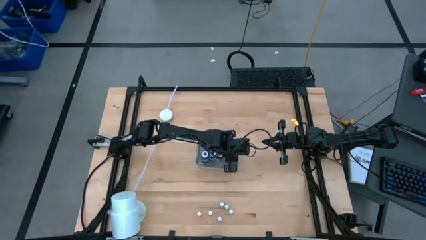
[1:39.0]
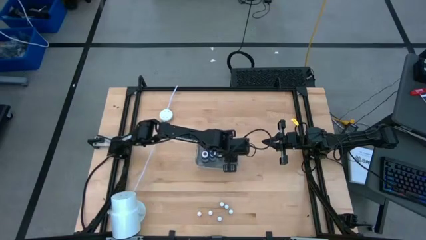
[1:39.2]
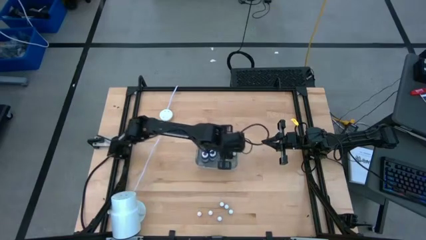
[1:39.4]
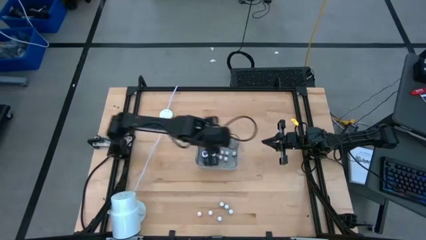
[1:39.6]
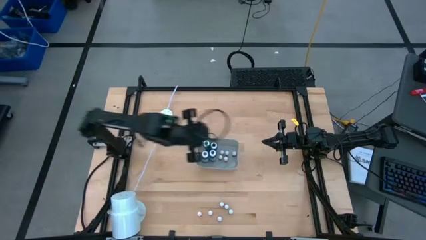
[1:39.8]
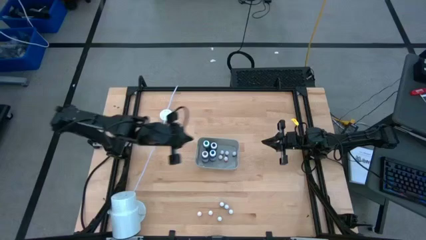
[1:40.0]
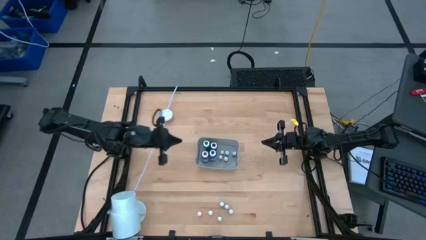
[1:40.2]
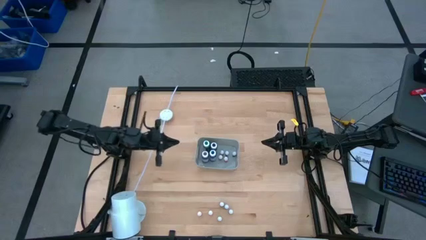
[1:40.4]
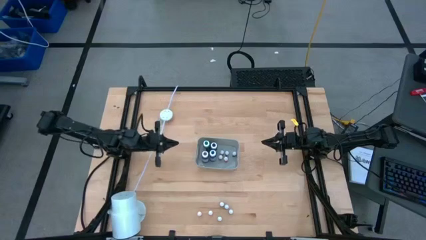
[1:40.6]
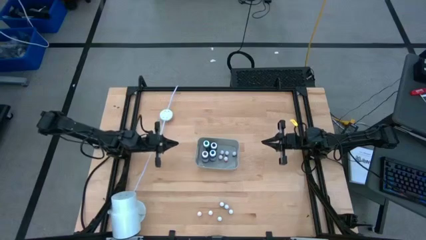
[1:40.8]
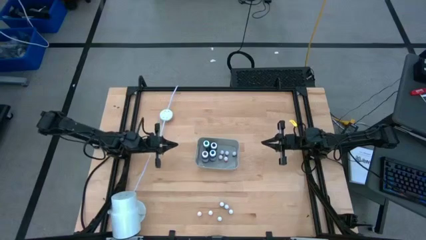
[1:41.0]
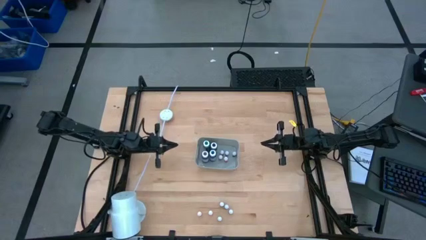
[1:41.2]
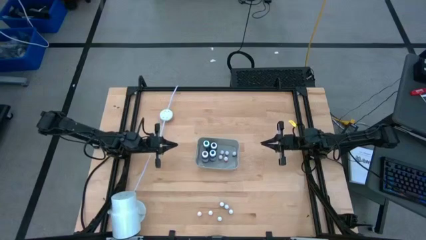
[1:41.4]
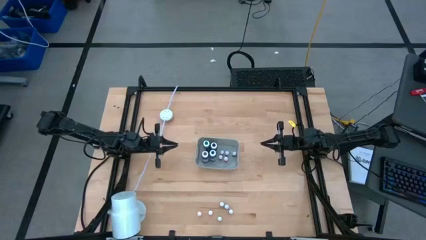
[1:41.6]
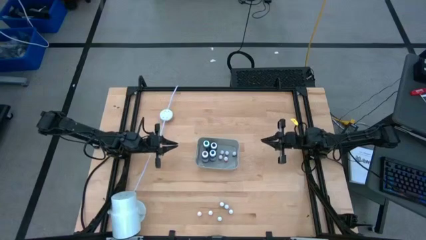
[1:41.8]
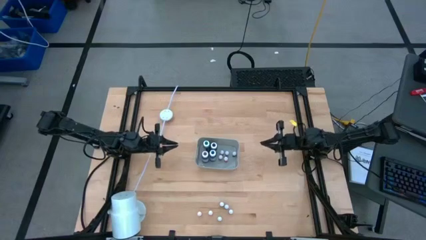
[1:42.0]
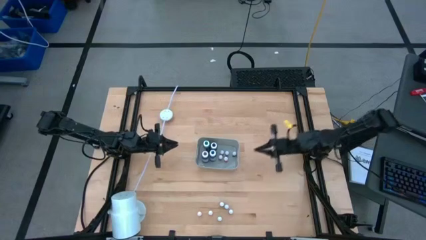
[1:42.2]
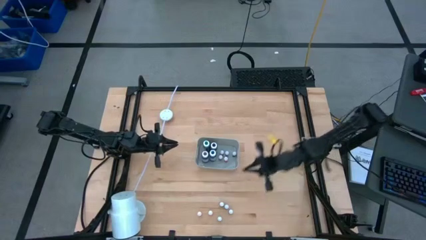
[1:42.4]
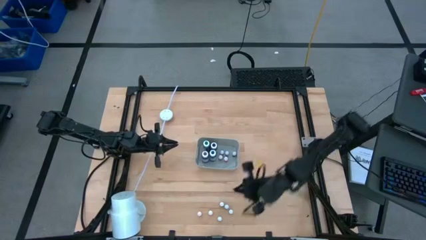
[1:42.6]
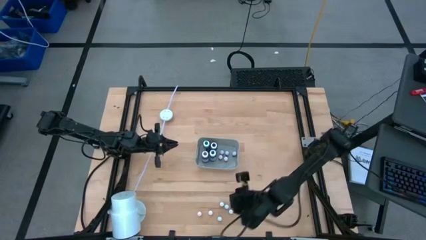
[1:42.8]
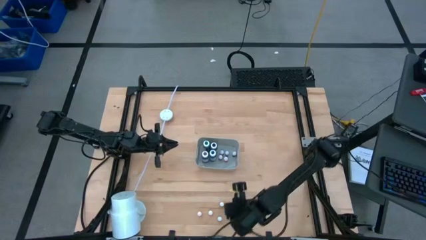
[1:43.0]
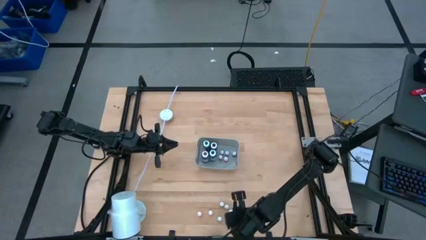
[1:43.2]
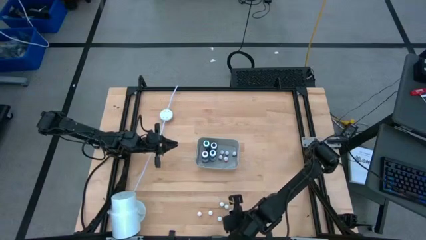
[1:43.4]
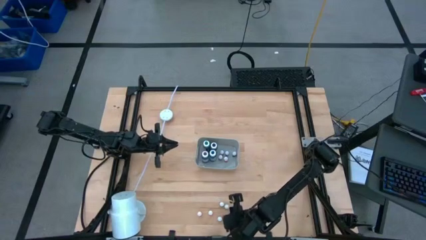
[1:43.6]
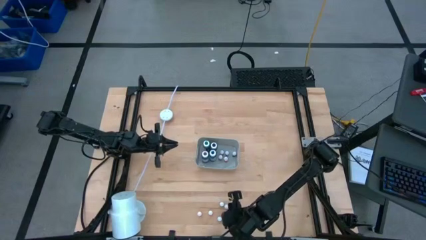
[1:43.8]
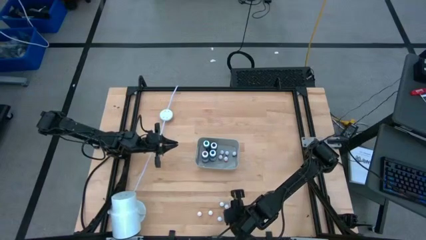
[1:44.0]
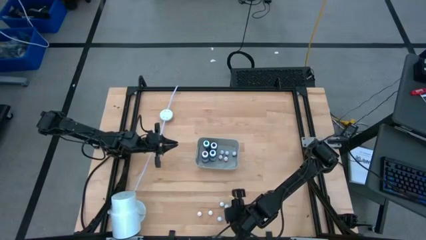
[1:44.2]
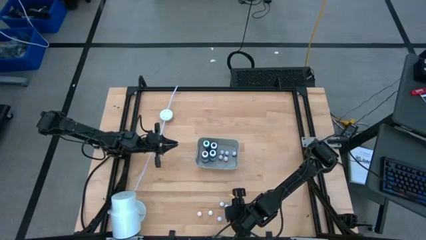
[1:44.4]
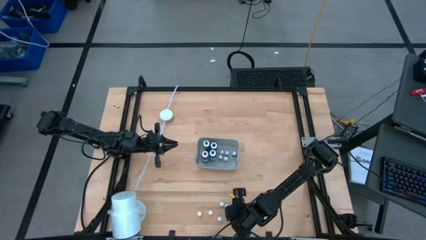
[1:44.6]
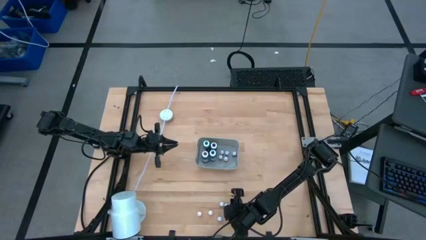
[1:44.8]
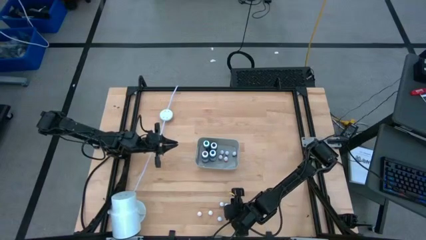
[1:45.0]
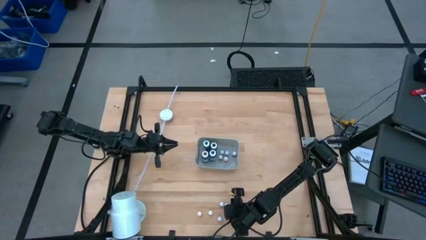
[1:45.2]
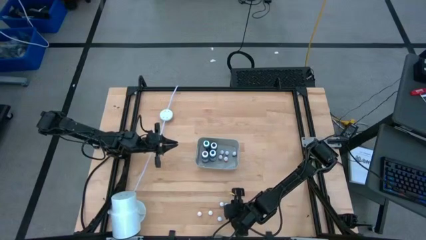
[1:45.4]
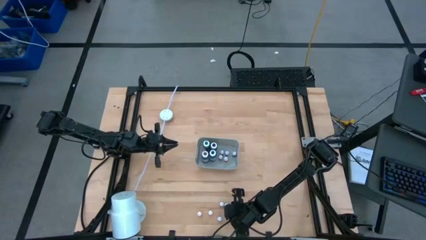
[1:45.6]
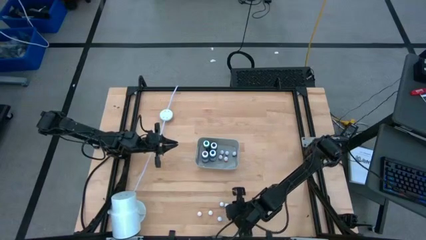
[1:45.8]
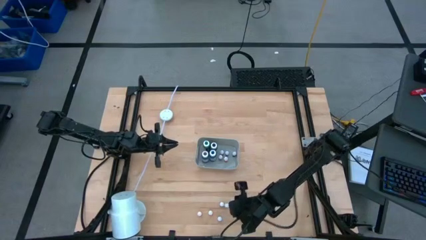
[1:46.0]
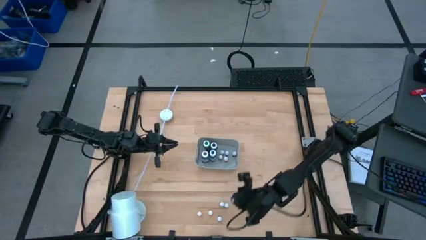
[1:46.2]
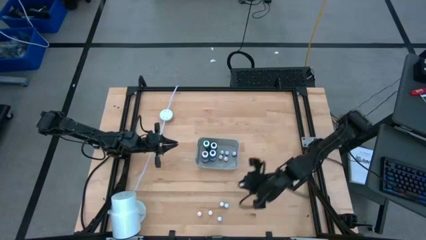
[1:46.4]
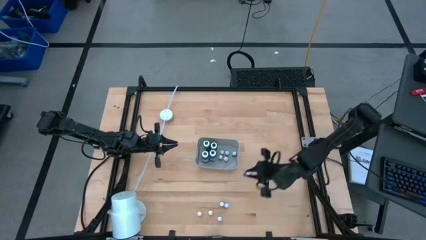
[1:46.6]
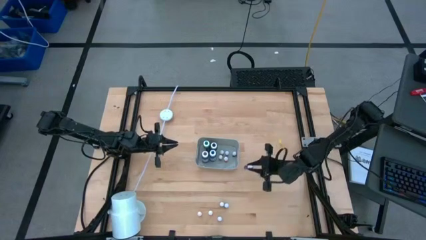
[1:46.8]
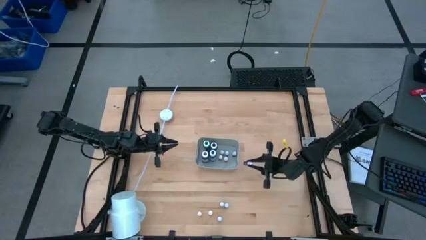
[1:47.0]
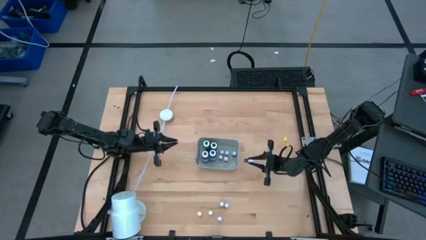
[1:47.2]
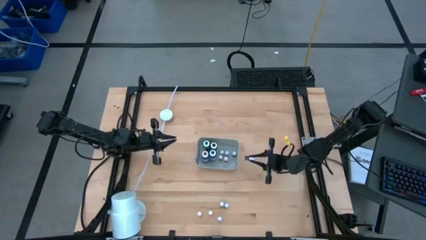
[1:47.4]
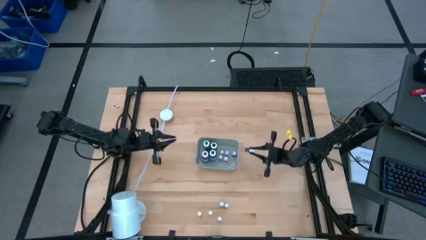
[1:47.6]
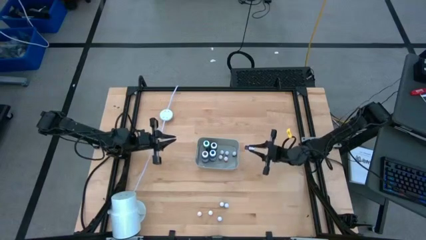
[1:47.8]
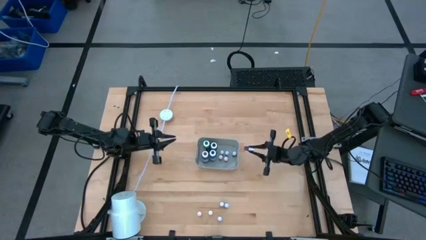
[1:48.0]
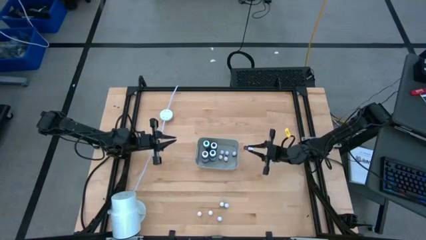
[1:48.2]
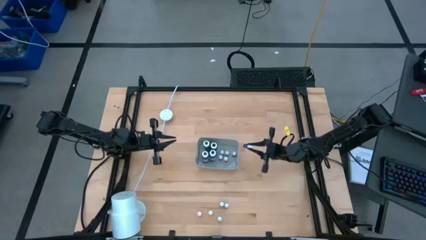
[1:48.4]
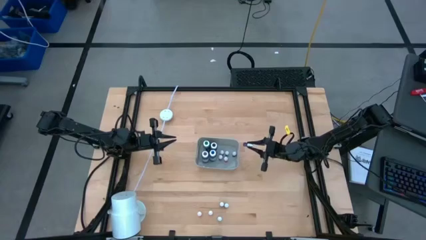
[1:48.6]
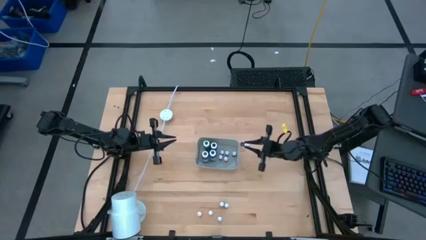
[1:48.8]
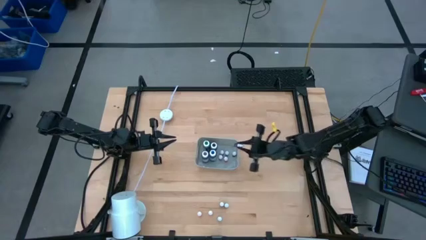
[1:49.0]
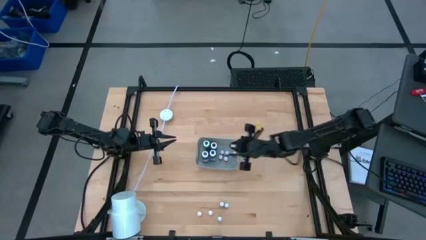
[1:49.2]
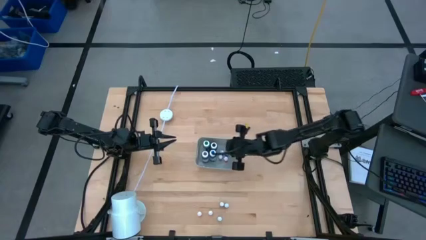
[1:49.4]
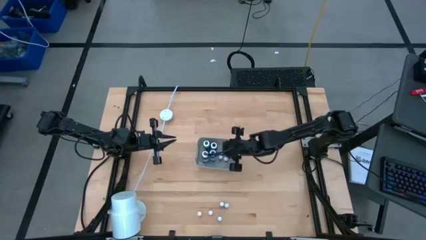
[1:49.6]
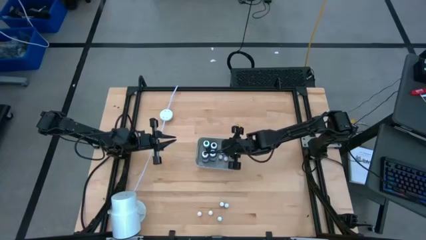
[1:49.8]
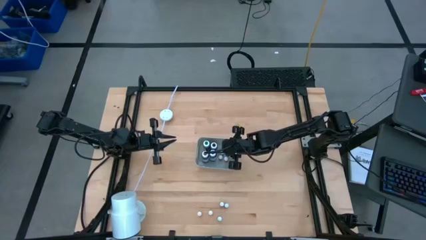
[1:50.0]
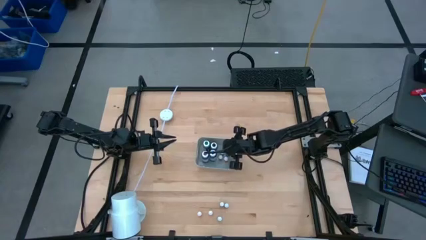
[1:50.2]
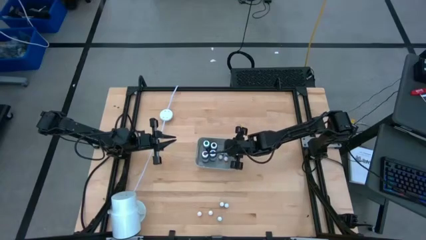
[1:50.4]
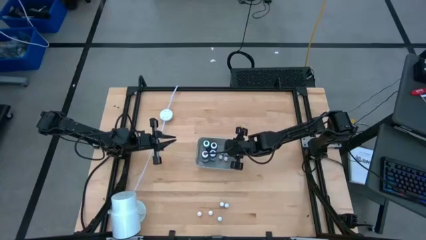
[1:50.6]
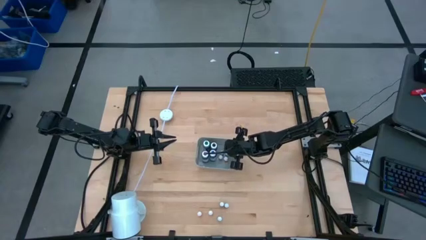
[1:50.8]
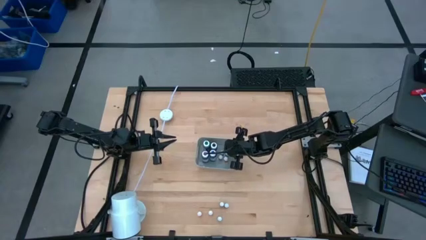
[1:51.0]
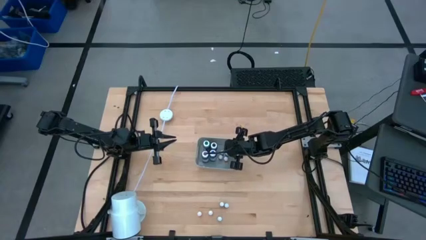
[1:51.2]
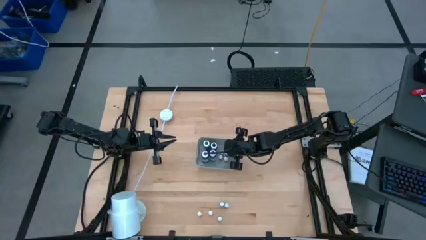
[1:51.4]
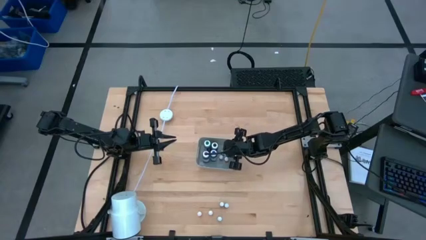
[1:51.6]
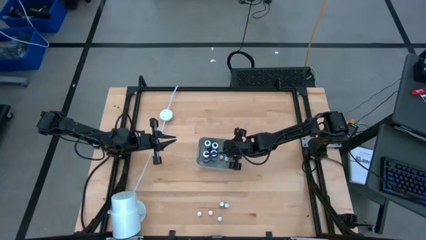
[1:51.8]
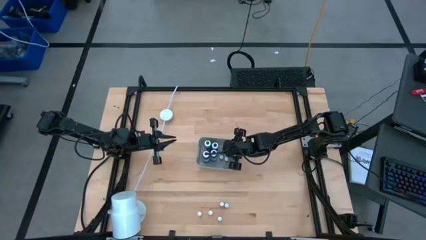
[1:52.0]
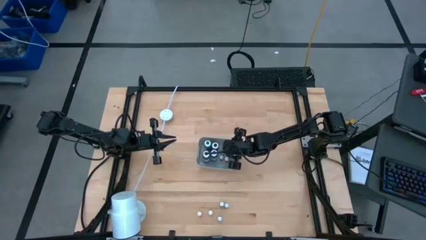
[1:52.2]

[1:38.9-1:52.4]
Task: Pick & Place food coloring
Put the small purple food coloring bottle into the gray container

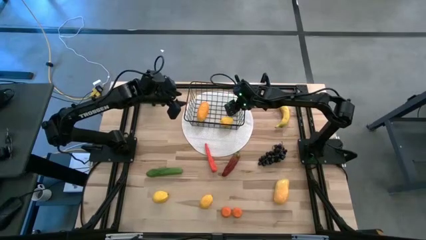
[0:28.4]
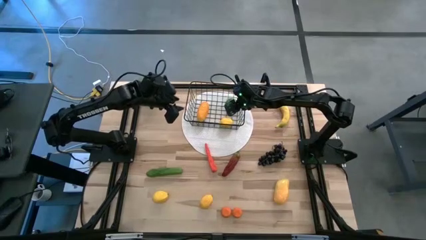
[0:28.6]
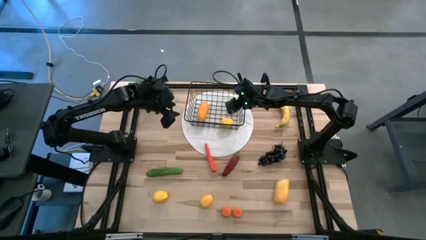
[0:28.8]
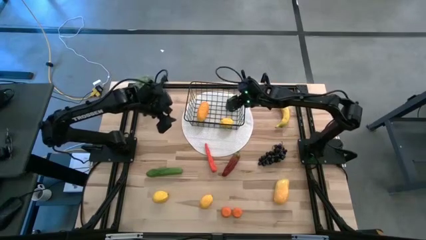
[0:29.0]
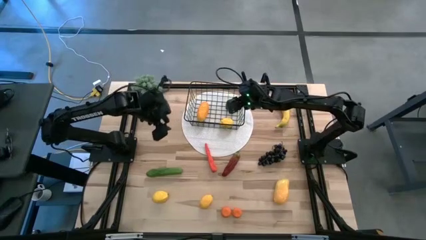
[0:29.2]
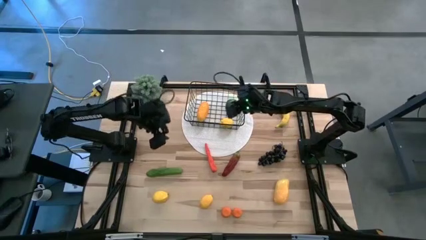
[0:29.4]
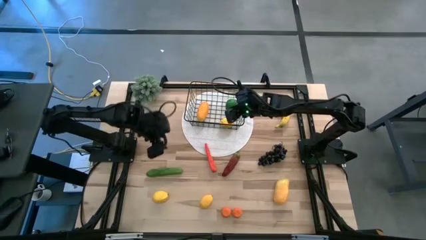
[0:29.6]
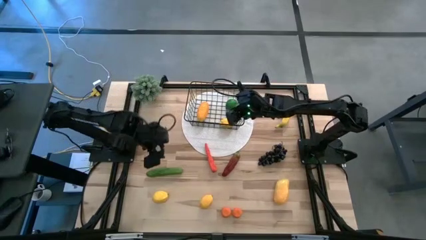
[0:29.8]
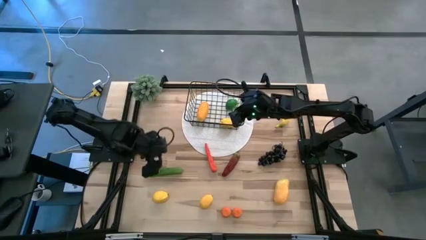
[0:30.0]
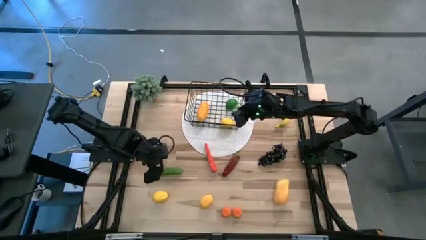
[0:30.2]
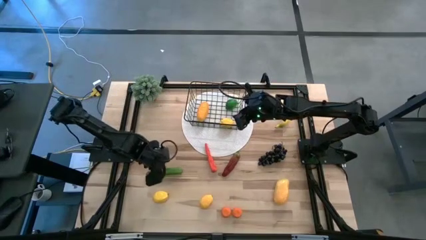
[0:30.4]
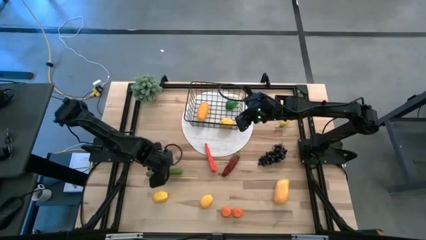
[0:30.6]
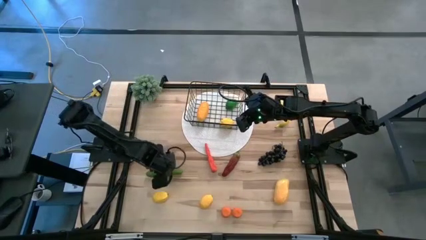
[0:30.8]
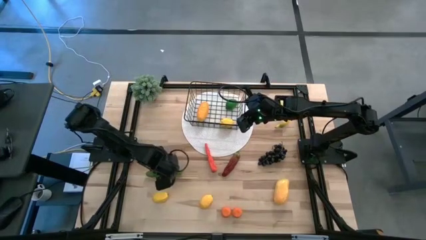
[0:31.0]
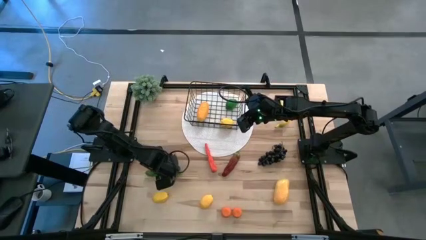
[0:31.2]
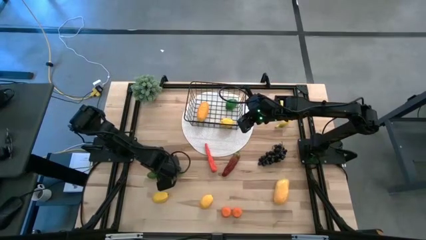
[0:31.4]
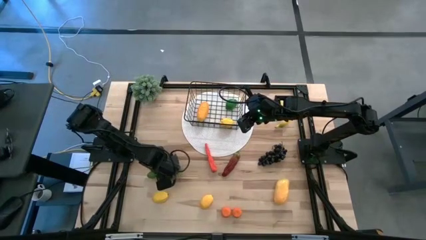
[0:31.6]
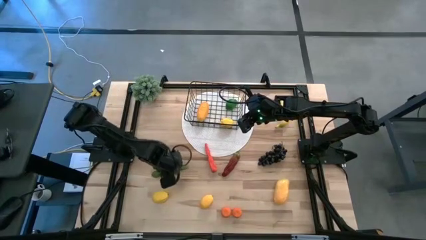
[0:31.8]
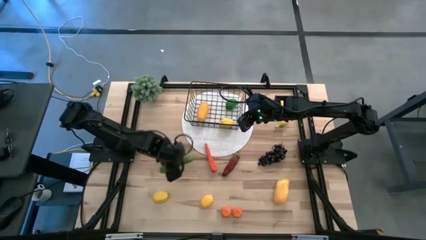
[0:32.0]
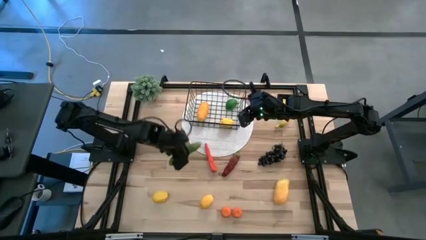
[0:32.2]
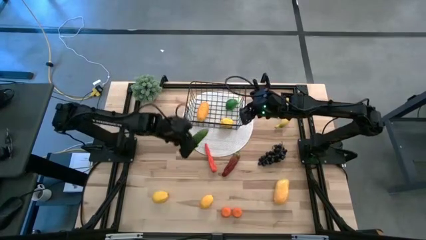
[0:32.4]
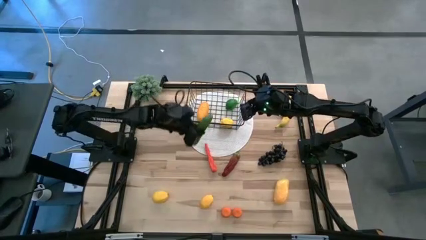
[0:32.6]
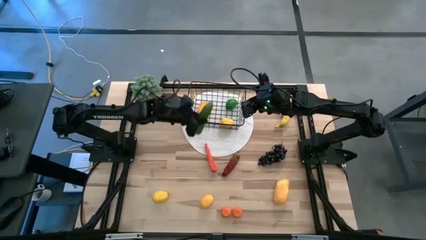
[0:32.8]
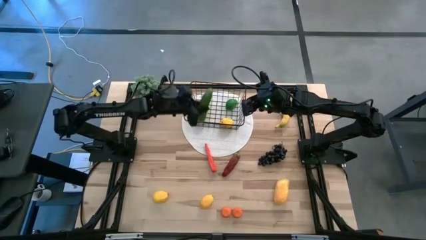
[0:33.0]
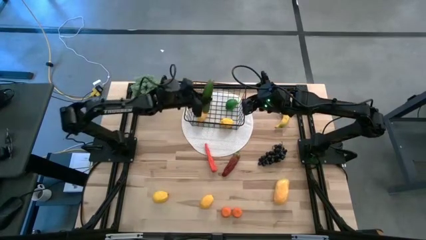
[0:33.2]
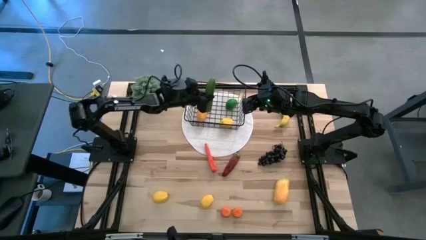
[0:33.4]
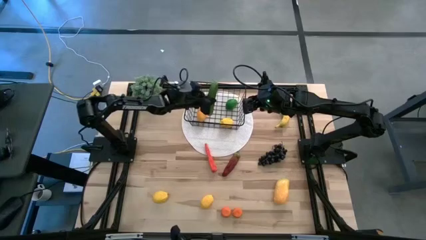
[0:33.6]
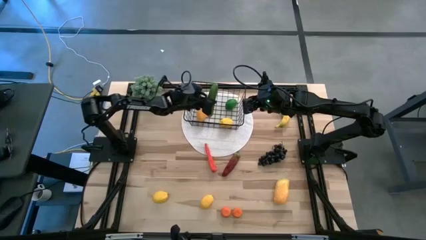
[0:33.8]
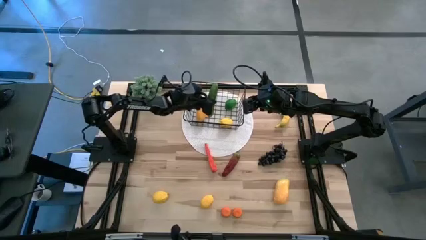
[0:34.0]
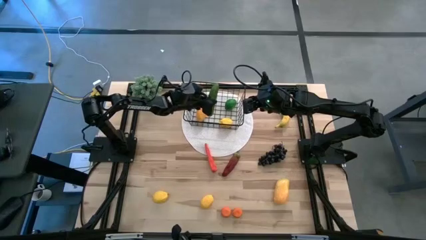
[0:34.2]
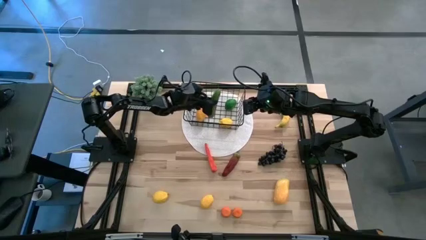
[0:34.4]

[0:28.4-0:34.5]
Task: Build produce basket
Put the cucumber into the wire basket
